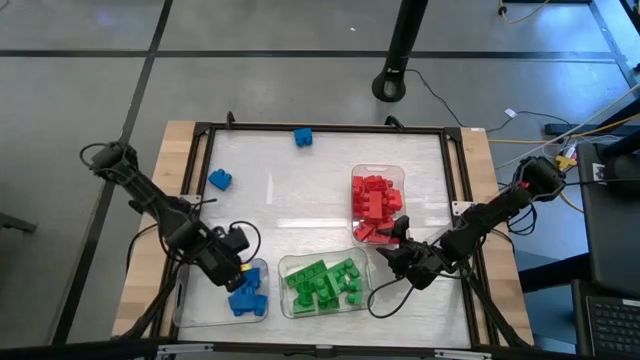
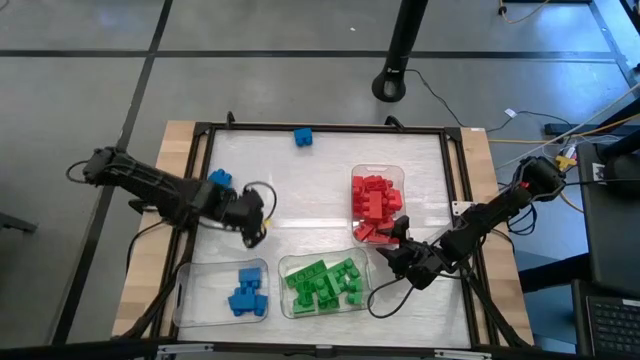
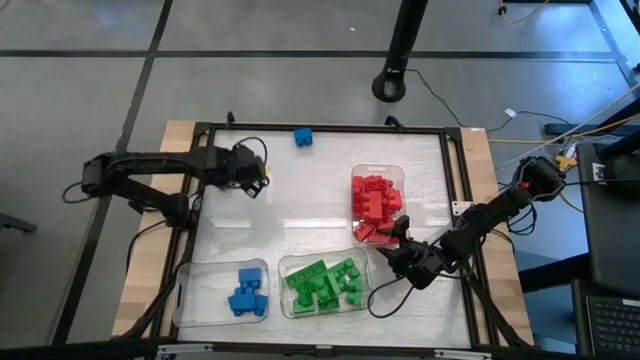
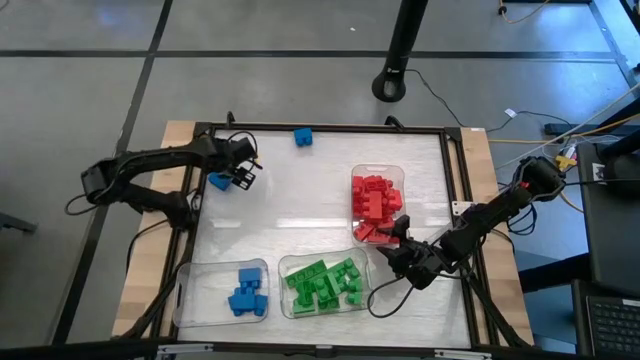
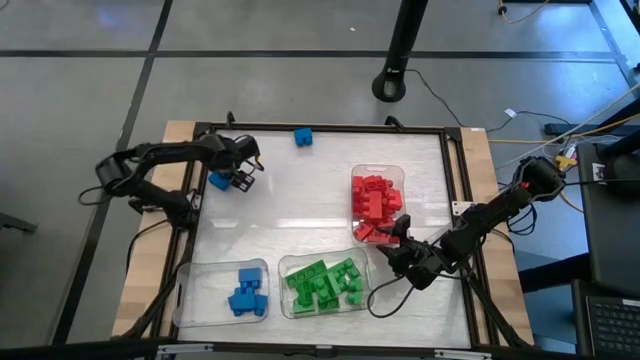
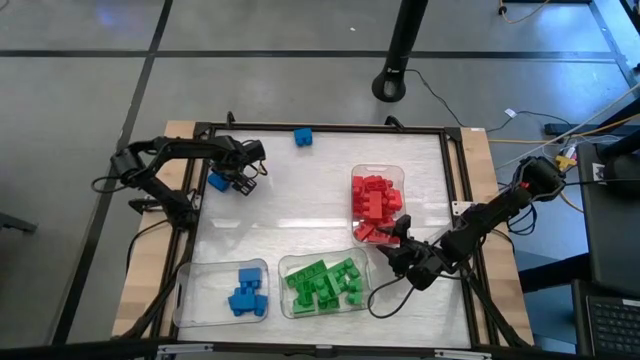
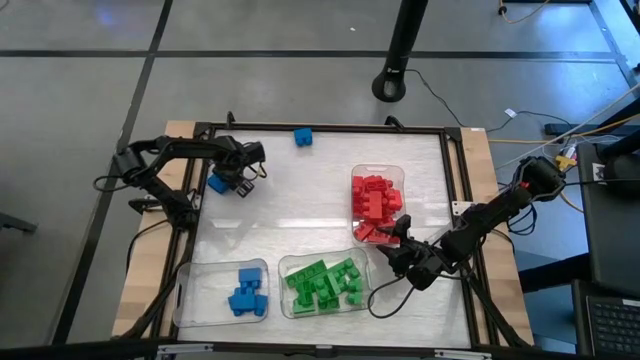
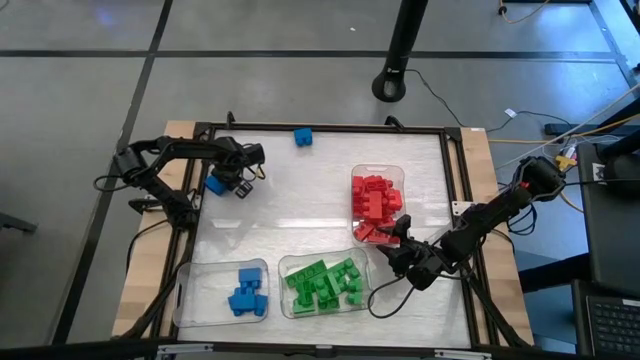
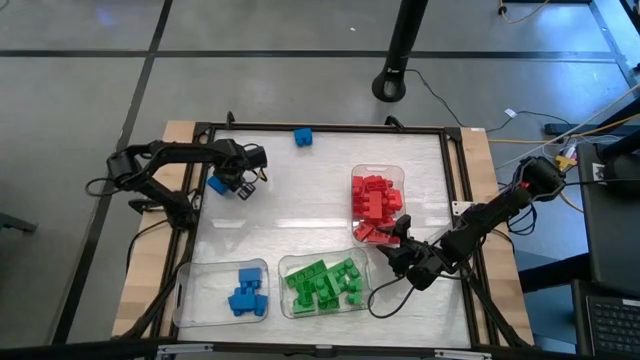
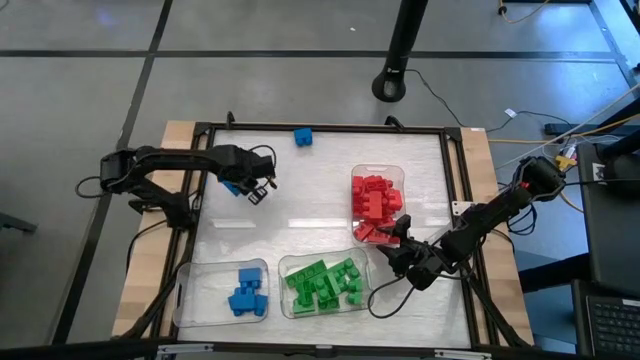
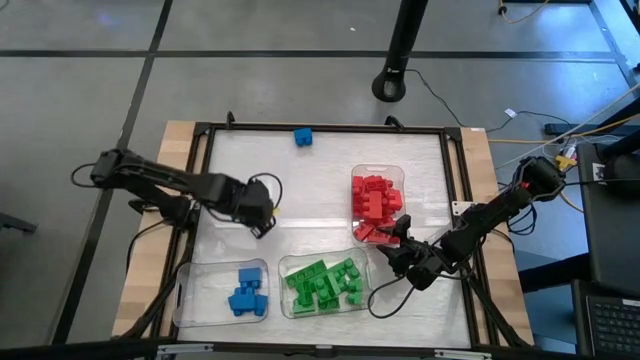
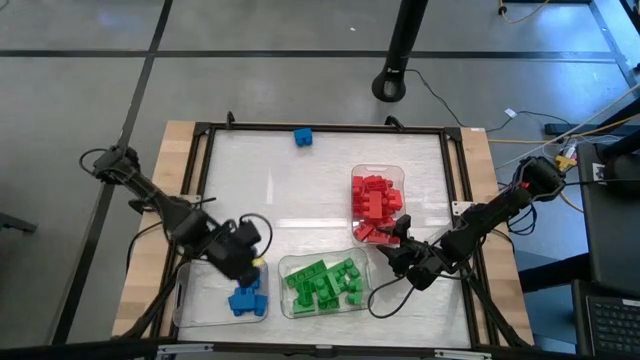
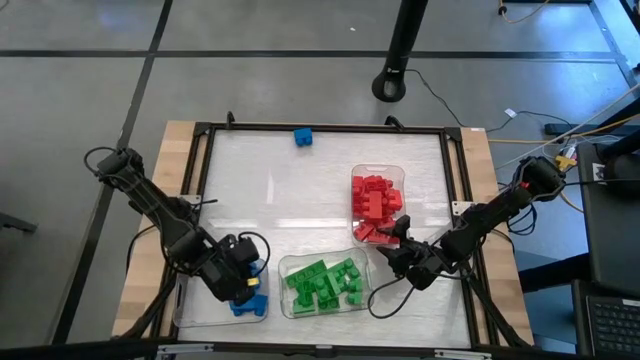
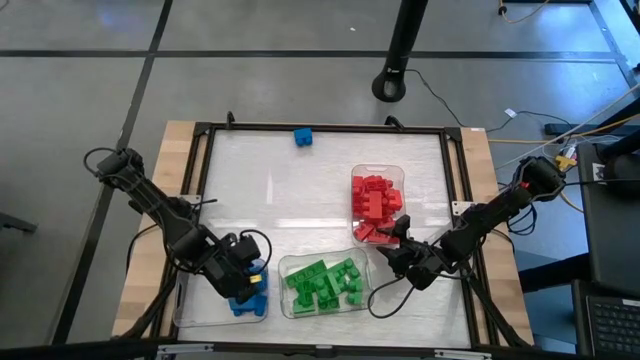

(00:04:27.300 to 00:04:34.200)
Task: Sort blocks
Put the blue game piece into the bottom left transparent bin

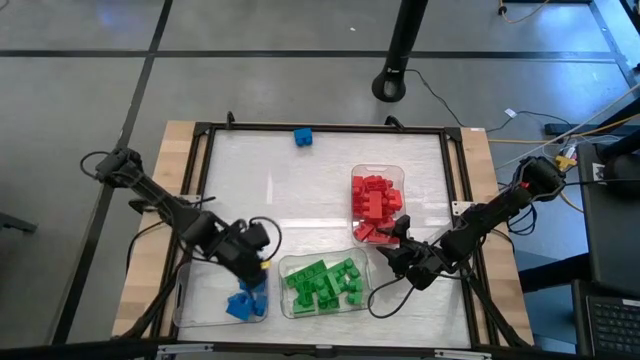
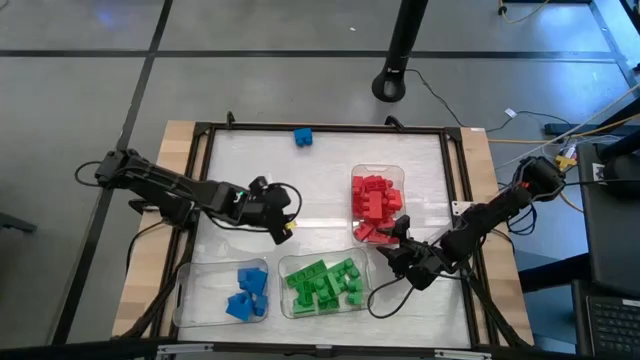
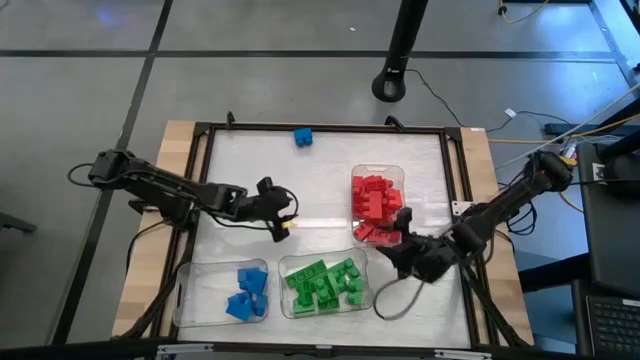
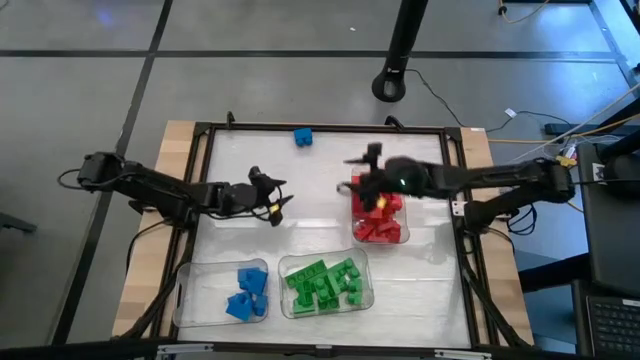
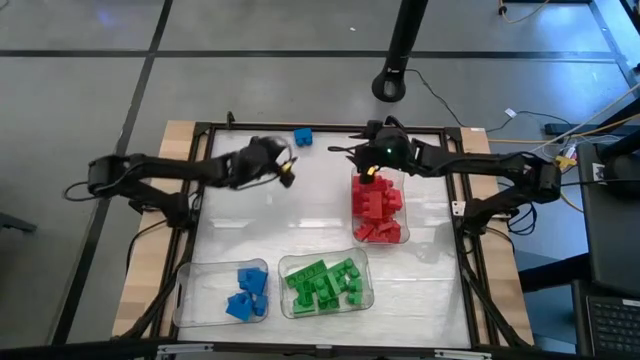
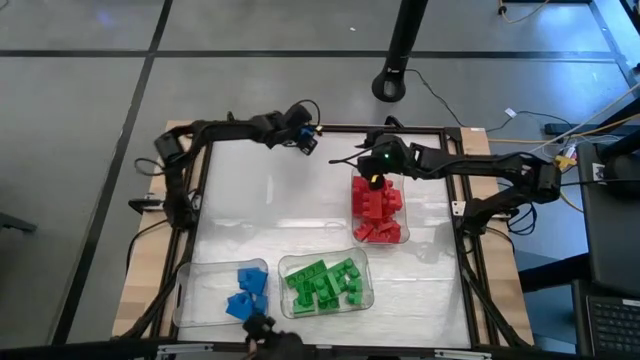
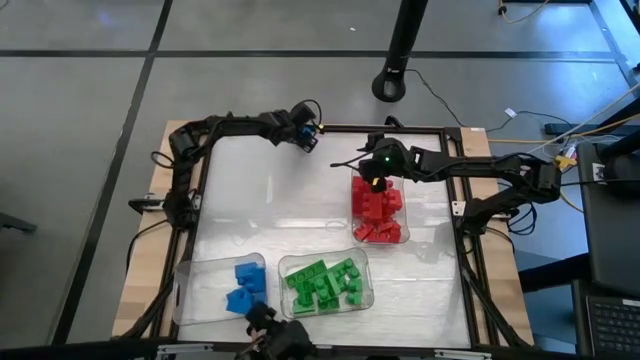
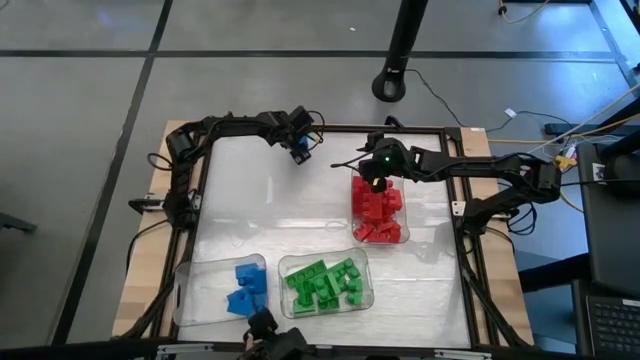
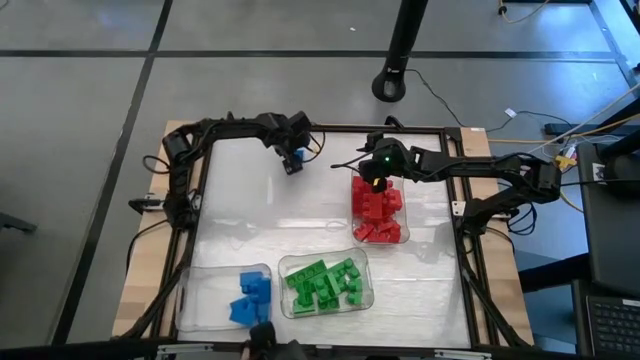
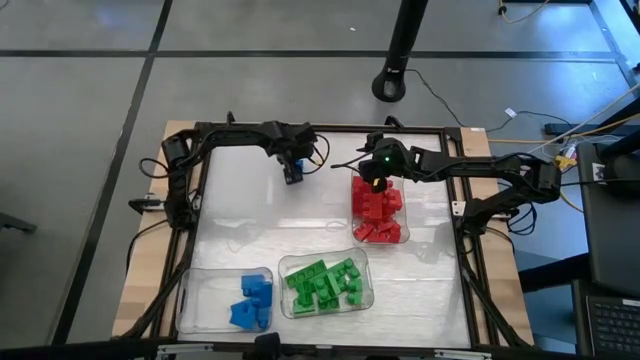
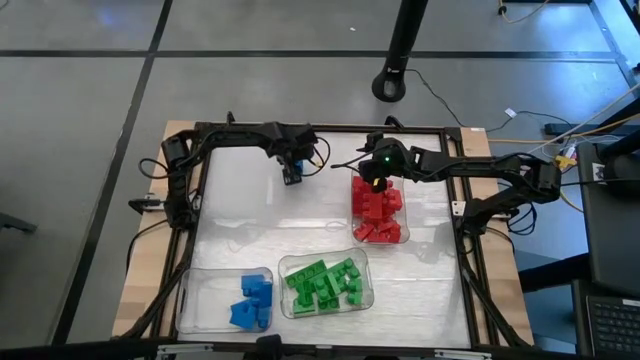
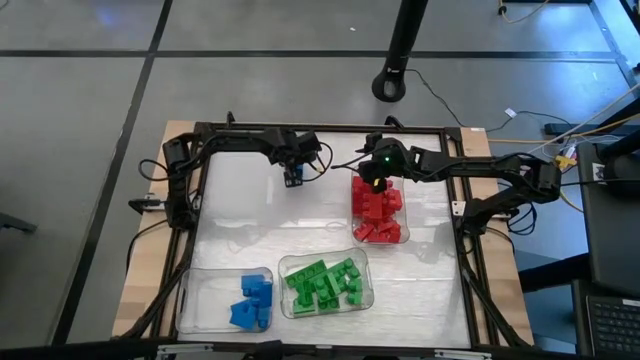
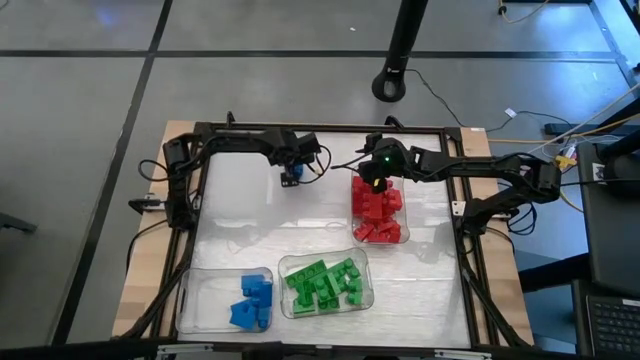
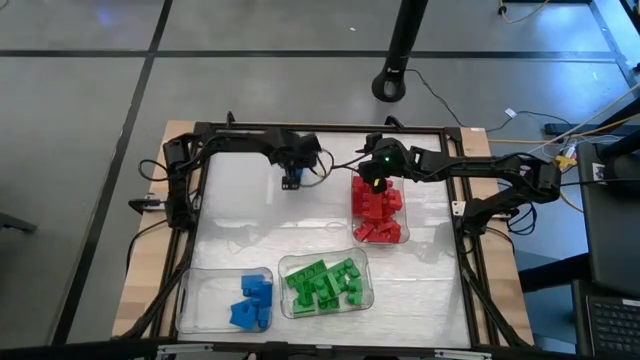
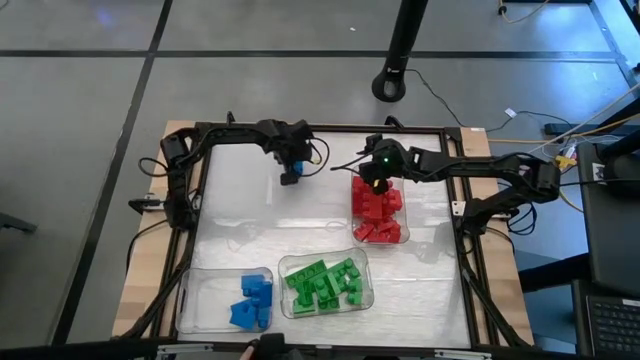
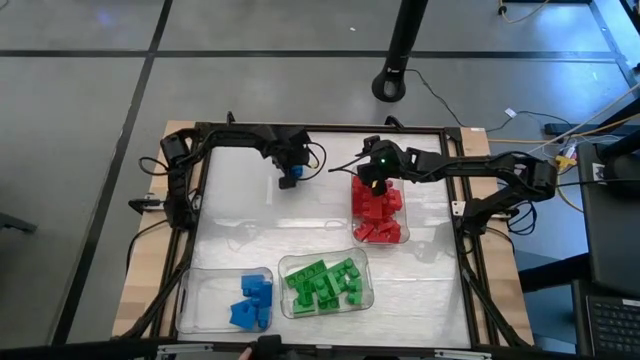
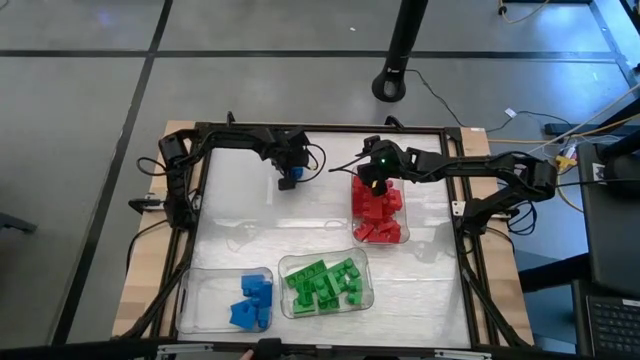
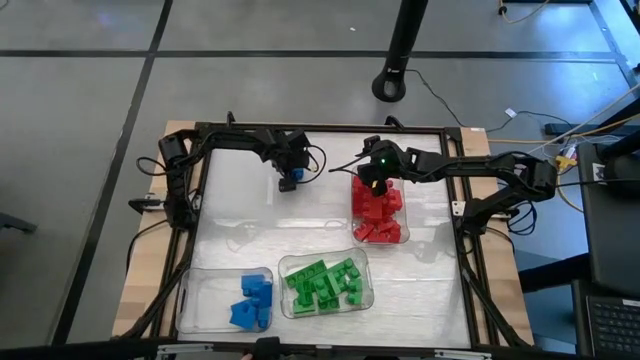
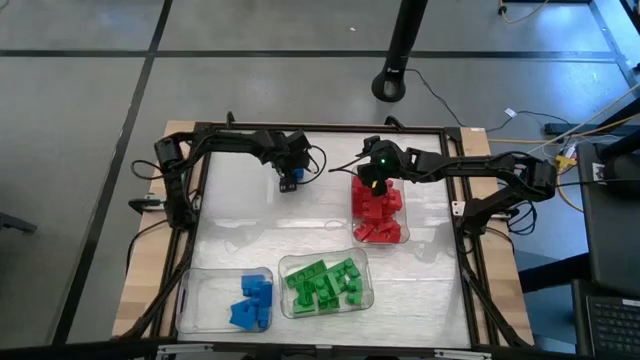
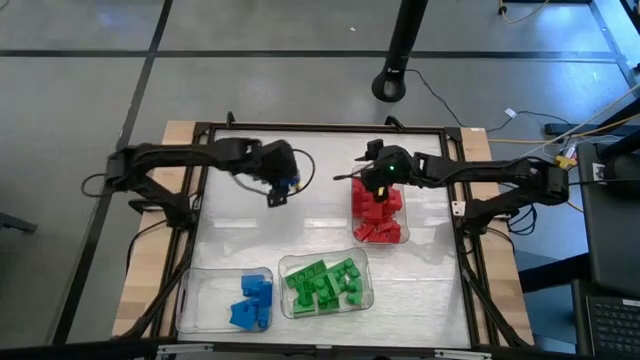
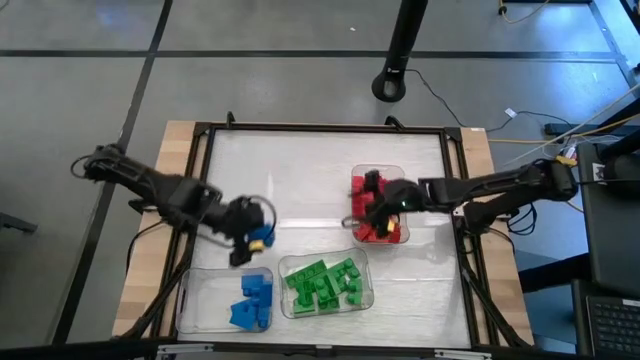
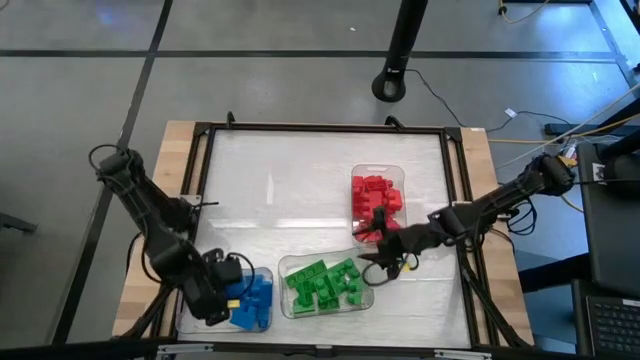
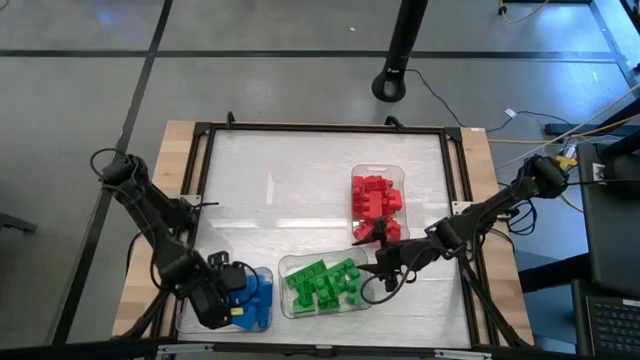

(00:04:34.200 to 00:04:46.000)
Put the blue game piece into the bottom left transparent bin

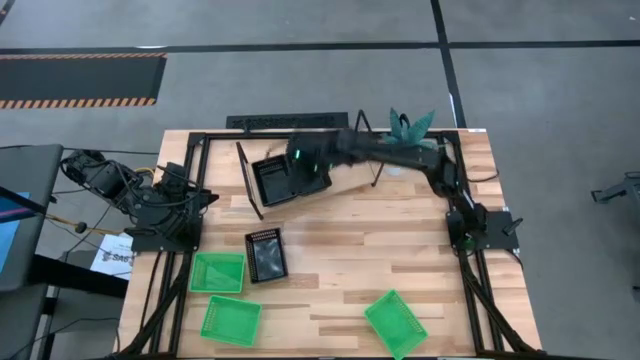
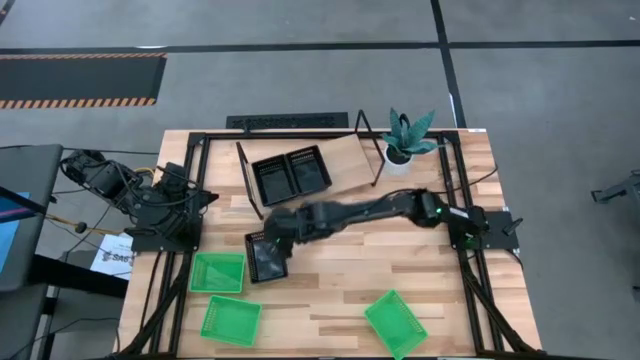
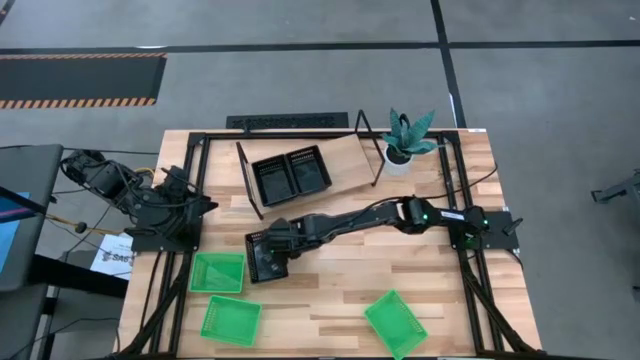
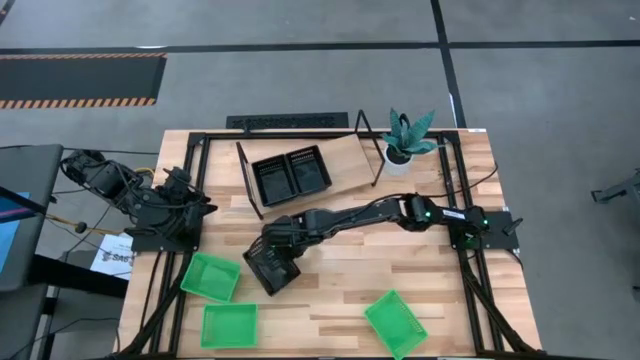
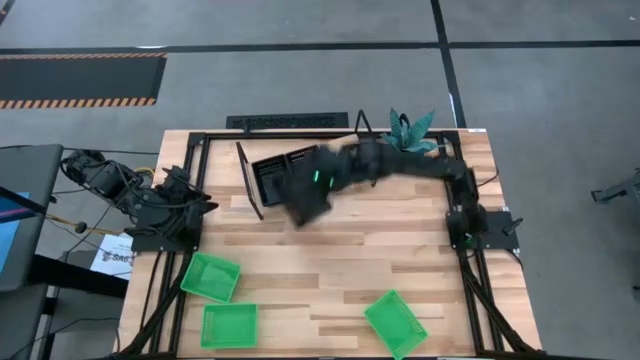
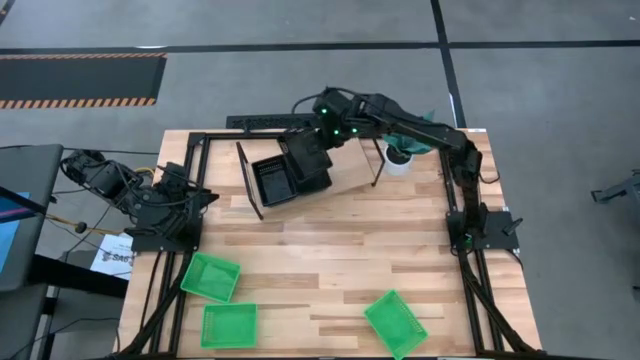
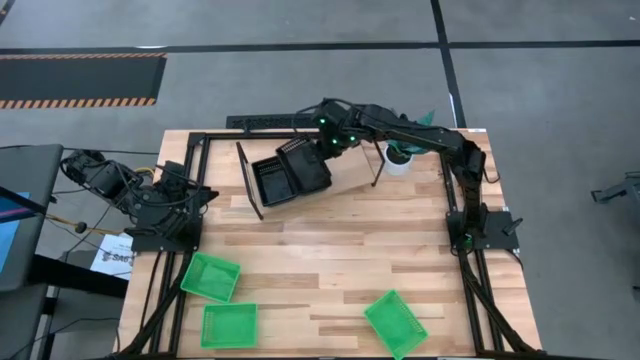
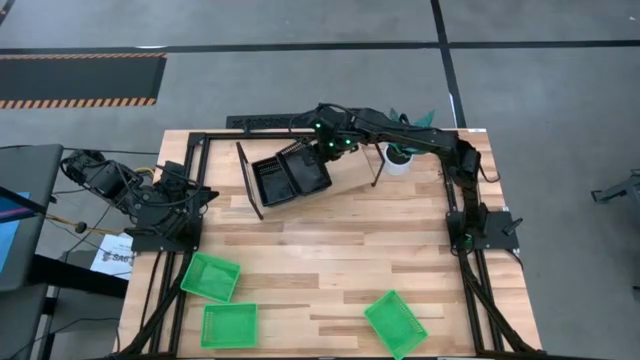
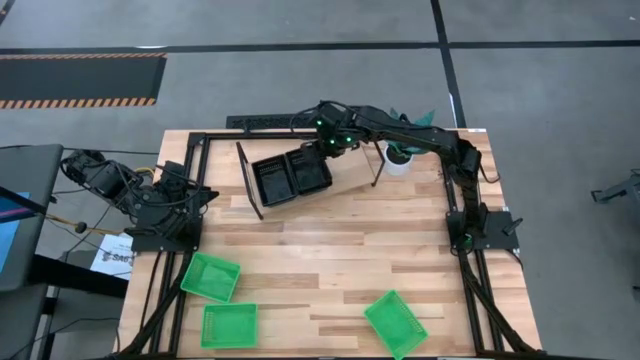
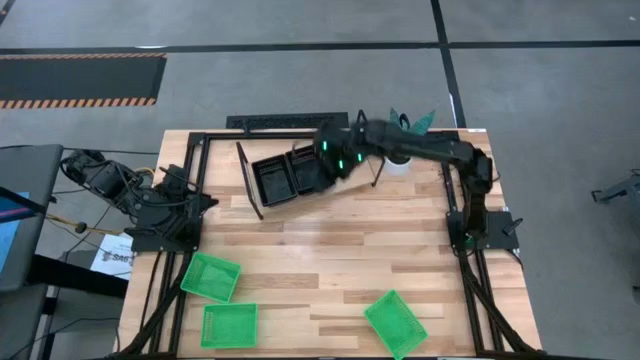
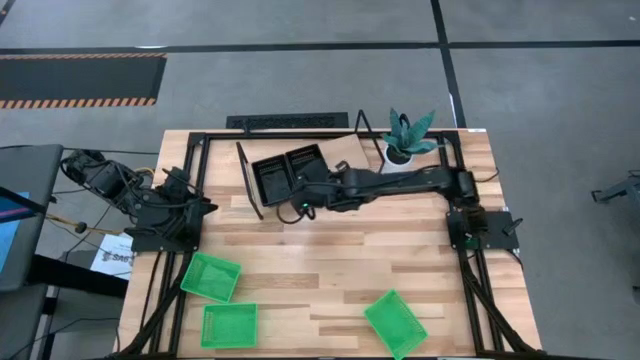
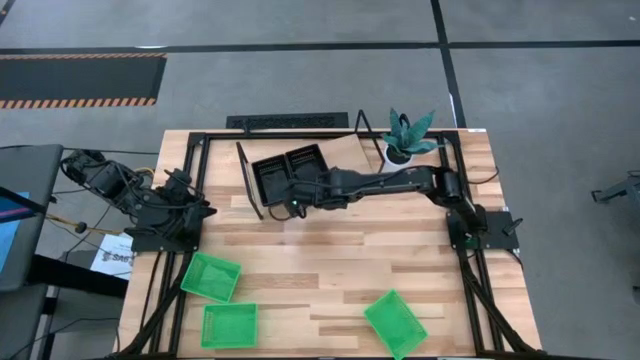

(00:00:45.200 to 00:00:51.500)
Task: Stack baskets on shelf by color
Stack the black basket on the right black basket
